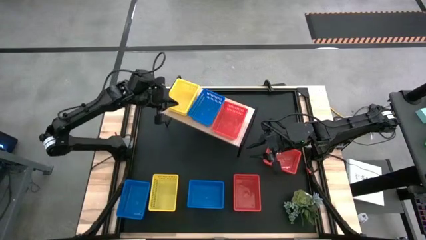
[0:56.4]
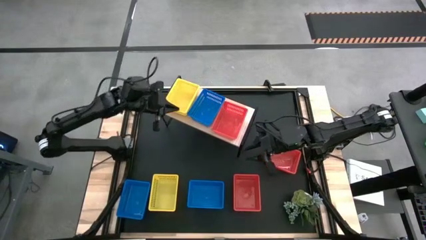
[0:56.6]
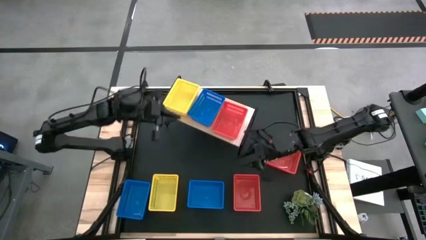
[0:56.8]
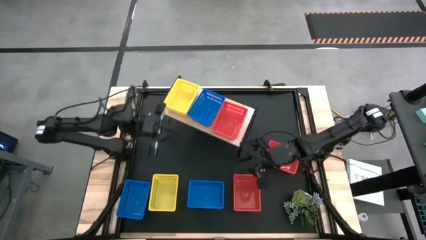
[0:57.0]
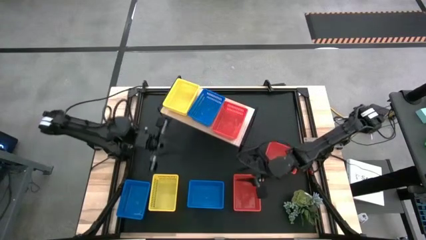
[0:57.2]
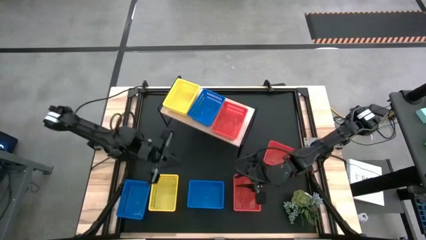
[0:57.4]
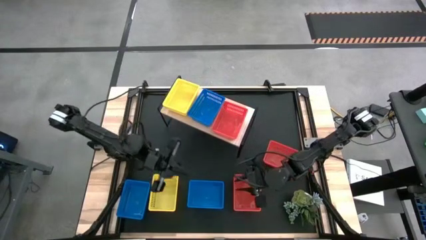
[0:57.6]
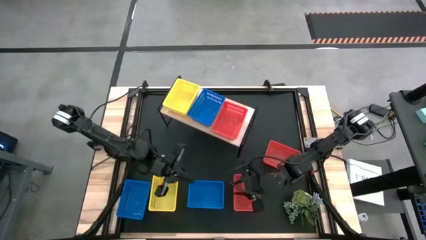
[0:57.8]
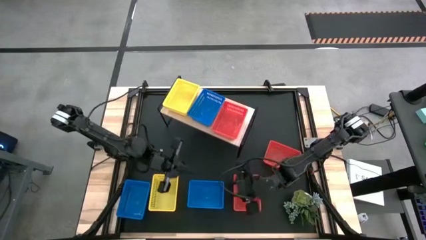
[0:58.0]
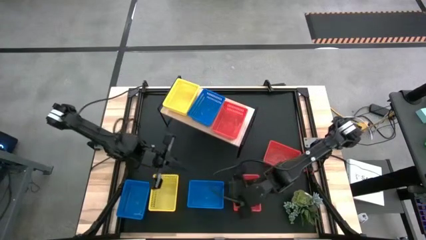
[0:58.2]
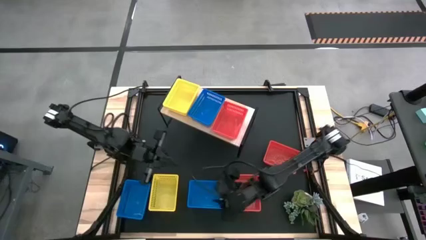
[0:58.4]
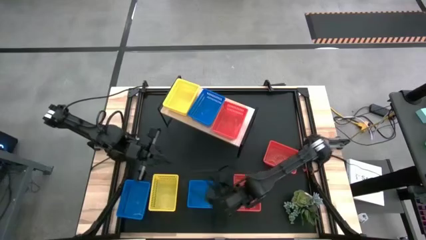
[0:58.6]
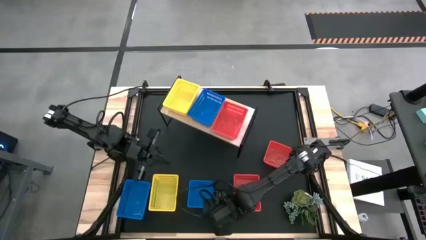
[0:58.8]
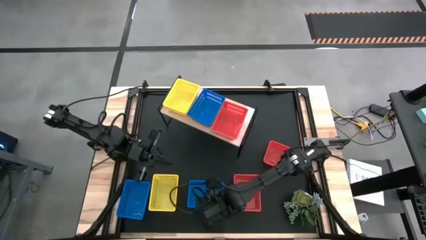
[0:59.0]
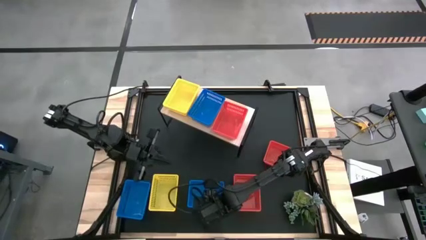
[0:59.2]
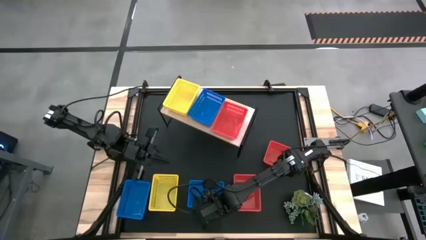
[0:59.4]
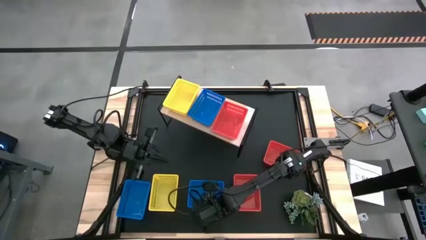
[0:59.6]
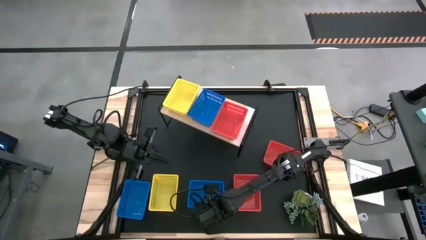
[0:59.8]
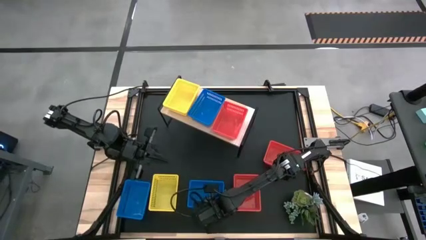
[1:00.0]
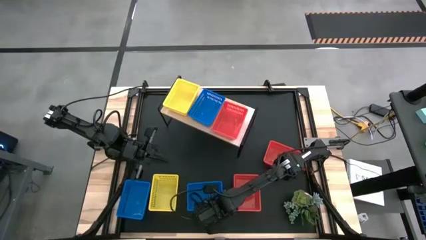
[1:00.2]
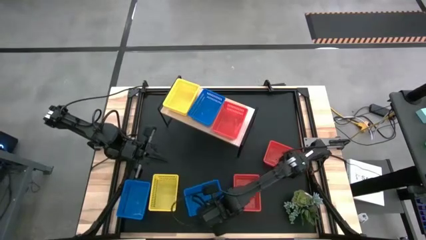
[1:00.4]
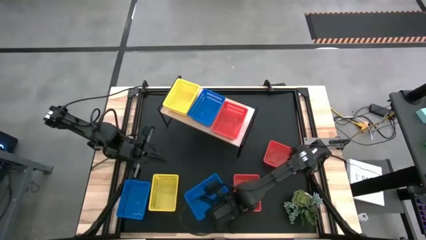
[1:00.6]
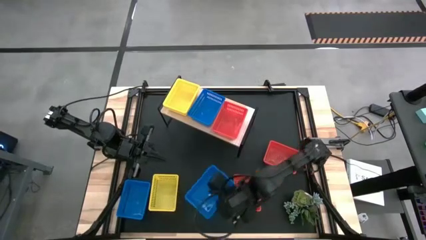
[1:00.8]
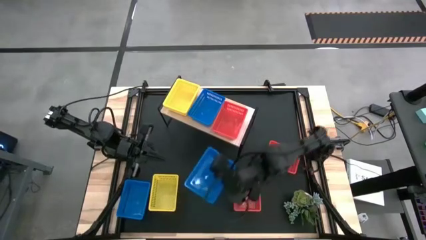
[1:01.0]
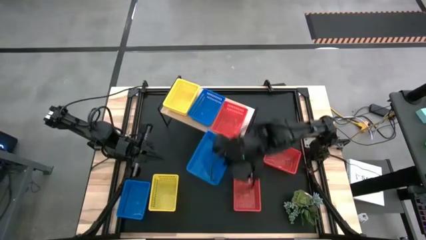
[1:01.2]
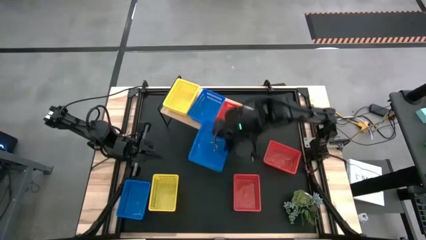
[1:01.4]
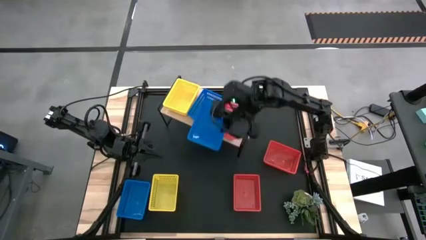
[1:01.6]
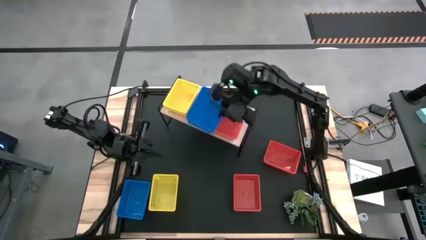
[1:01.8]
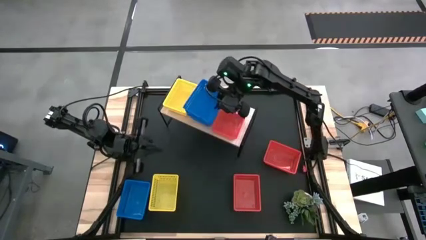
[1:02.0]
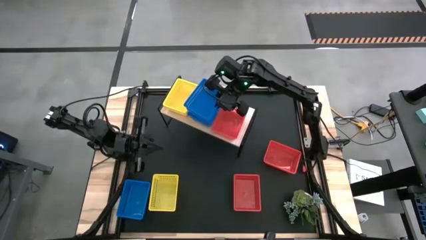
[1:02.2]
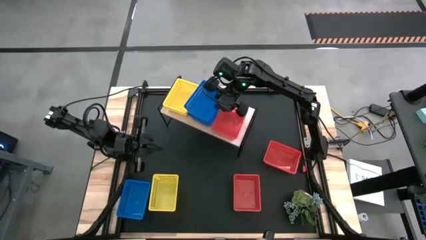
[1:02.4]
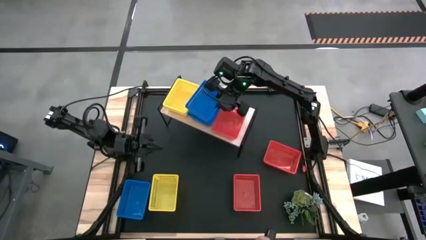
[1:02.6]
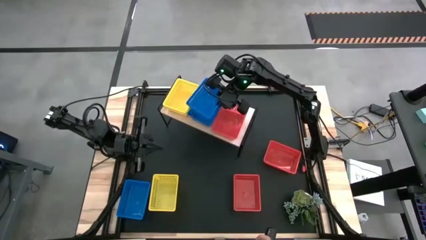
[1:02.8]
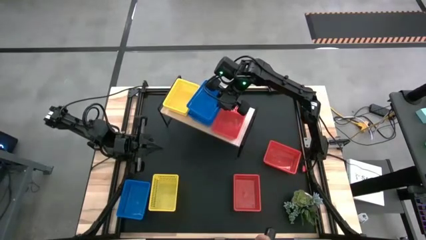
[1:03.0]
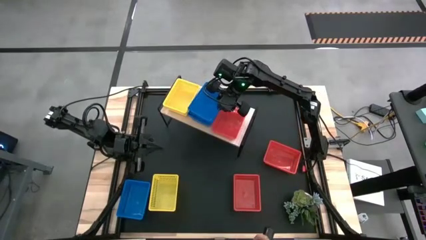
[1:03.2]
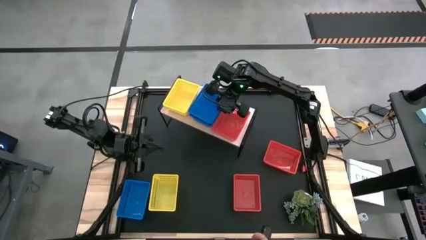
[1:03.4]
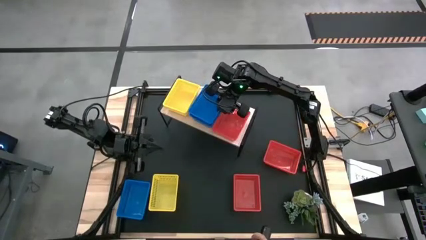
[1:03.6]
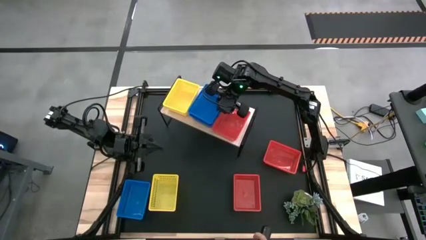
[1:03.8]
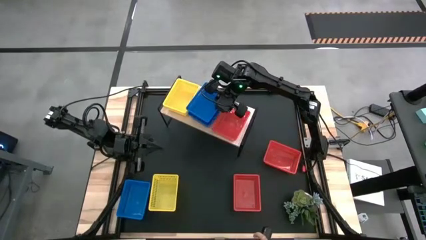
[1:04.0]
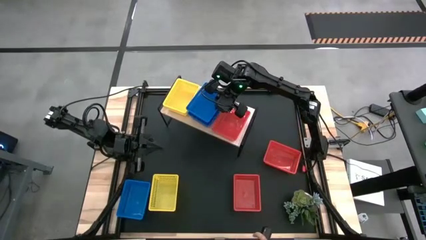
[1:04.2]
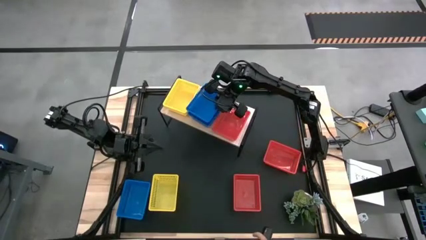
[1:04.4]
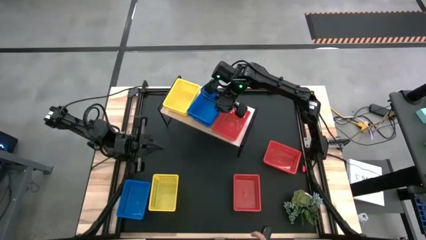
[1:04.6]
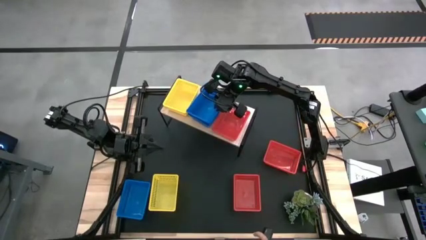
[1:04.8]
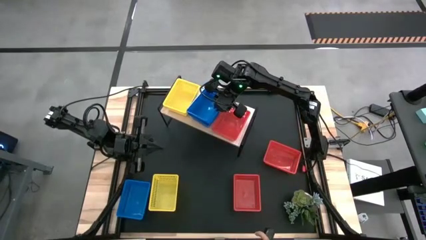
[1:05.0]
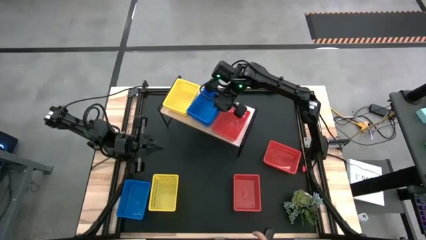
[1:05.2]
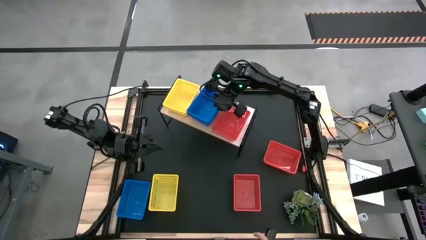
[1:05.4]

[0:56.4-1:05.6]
Task: Stack baskets on shelf by color
Stack the middle right blue bin on top of the blue bin on the shelf

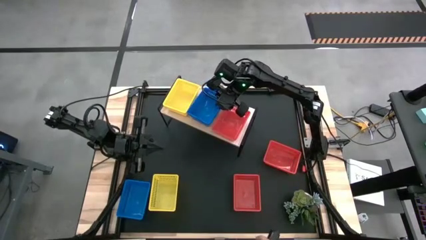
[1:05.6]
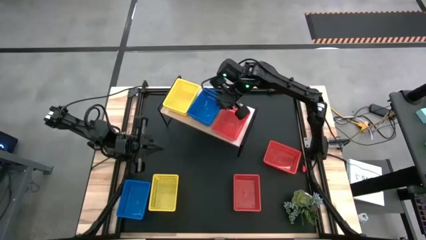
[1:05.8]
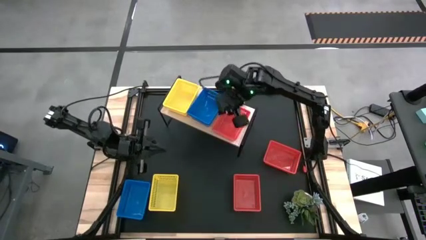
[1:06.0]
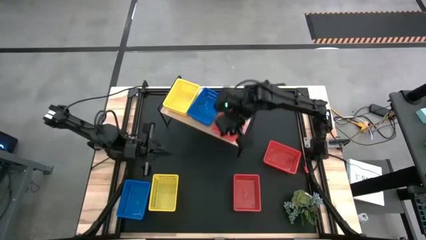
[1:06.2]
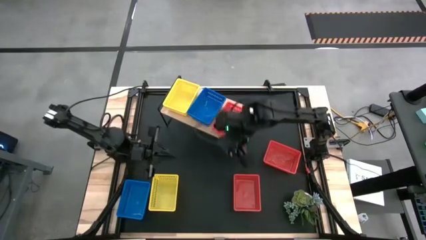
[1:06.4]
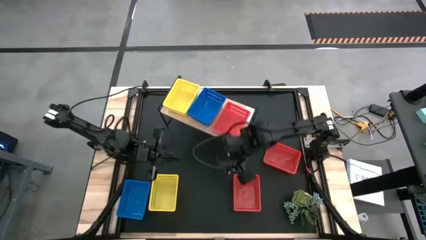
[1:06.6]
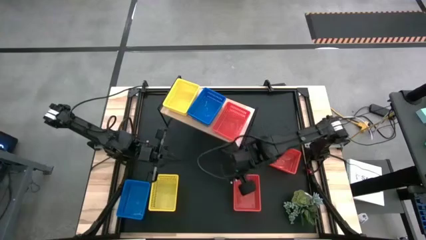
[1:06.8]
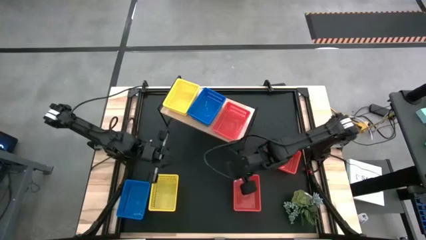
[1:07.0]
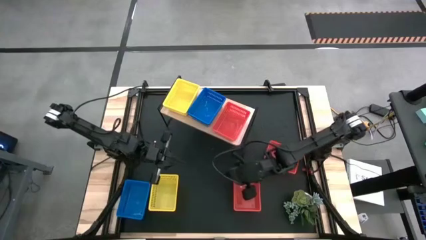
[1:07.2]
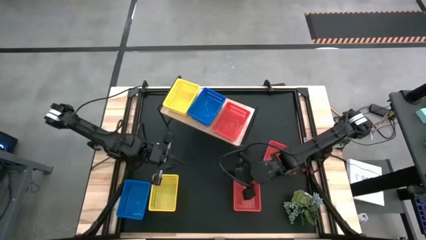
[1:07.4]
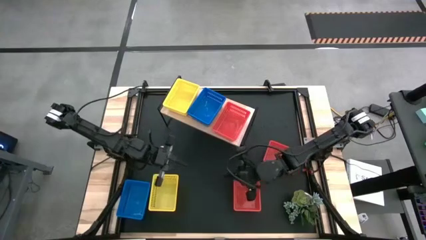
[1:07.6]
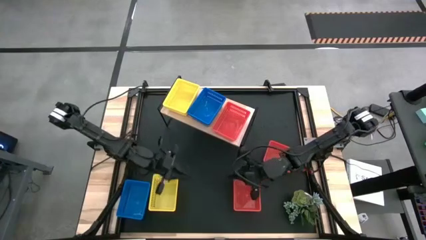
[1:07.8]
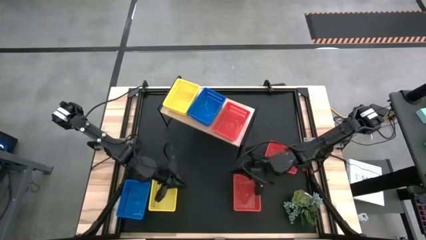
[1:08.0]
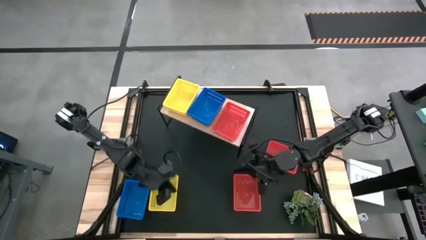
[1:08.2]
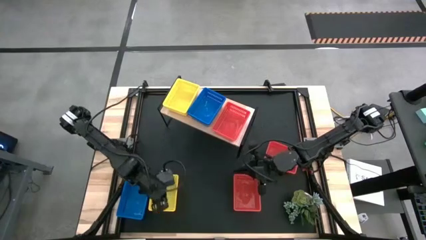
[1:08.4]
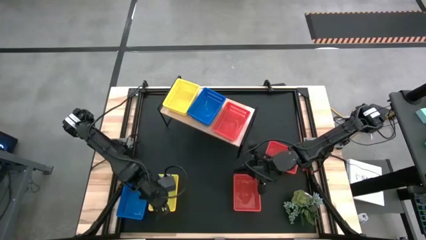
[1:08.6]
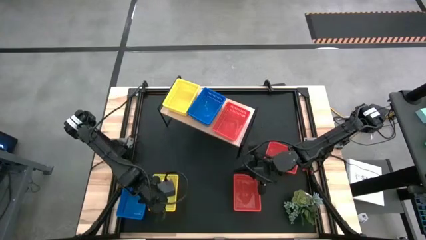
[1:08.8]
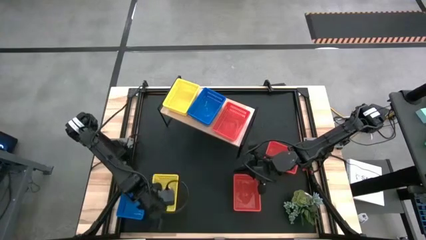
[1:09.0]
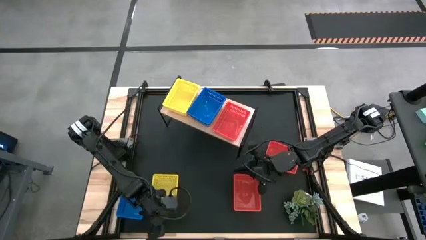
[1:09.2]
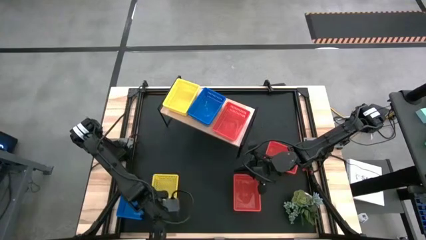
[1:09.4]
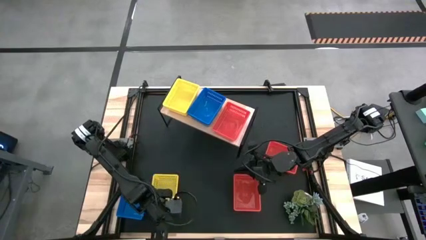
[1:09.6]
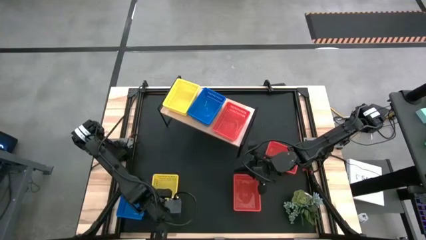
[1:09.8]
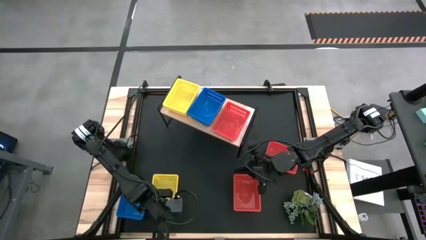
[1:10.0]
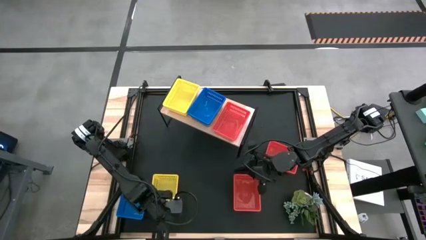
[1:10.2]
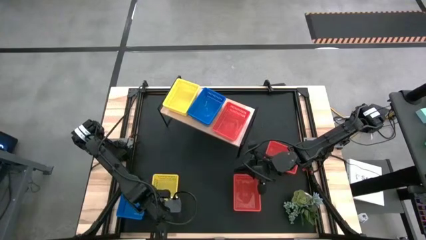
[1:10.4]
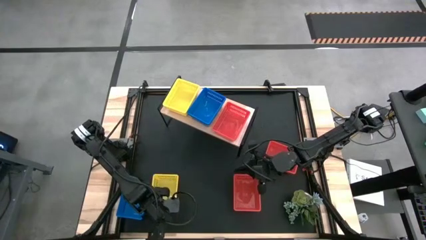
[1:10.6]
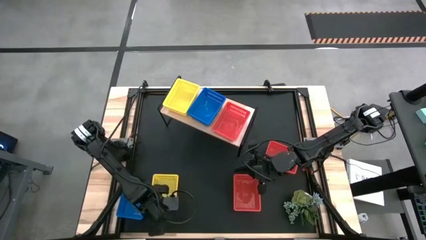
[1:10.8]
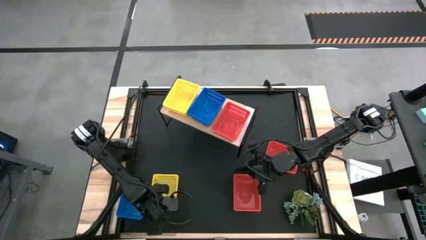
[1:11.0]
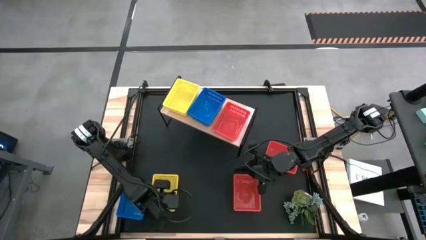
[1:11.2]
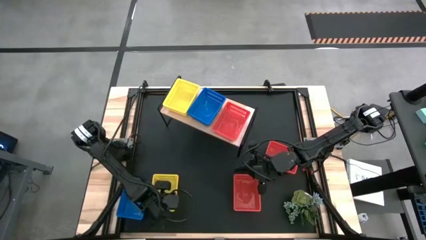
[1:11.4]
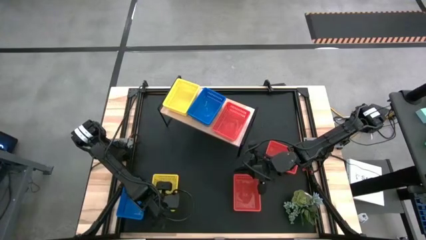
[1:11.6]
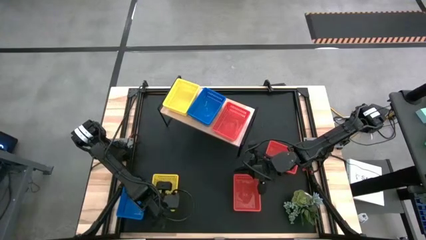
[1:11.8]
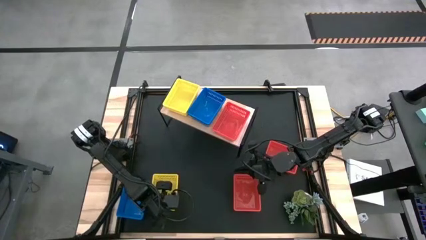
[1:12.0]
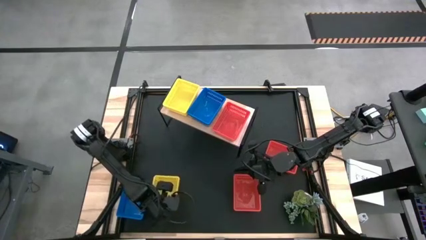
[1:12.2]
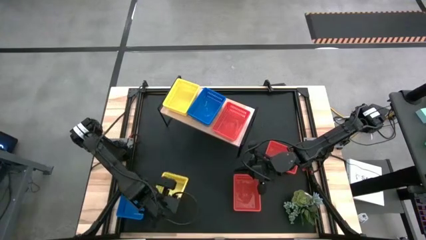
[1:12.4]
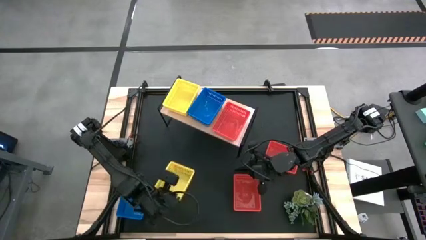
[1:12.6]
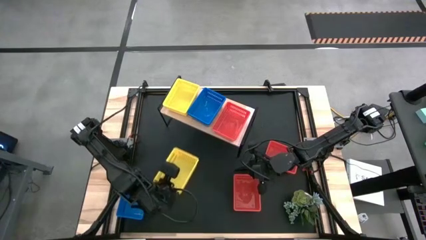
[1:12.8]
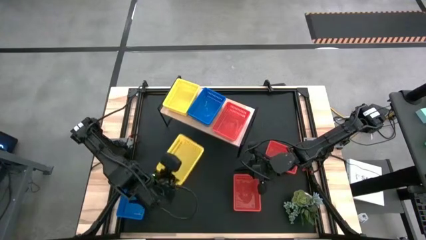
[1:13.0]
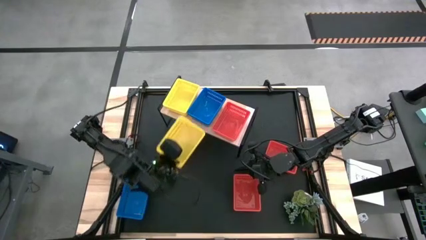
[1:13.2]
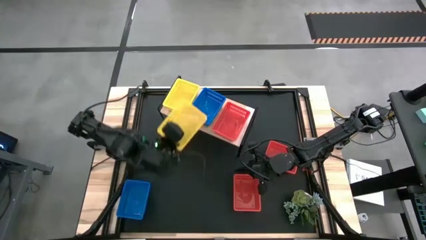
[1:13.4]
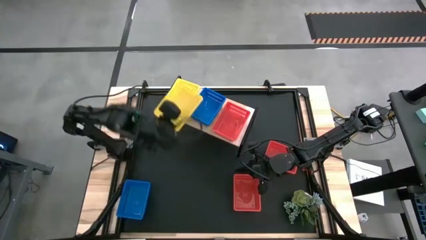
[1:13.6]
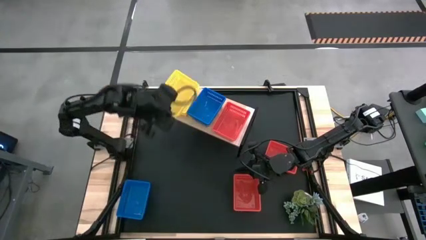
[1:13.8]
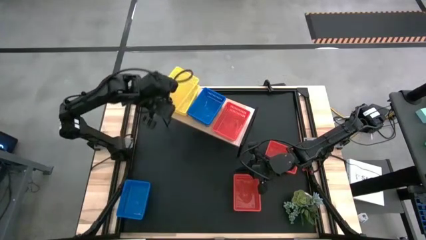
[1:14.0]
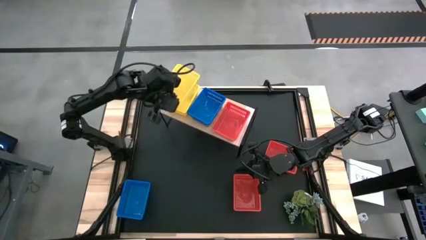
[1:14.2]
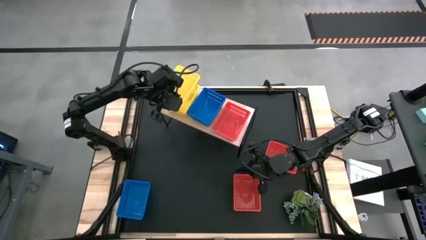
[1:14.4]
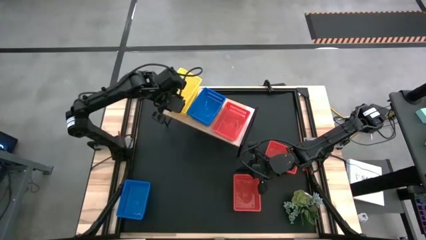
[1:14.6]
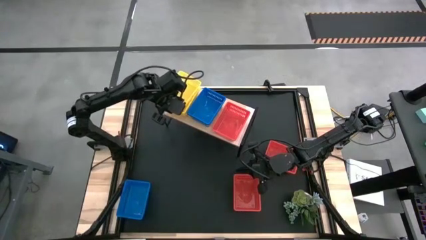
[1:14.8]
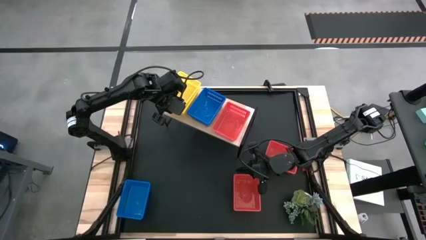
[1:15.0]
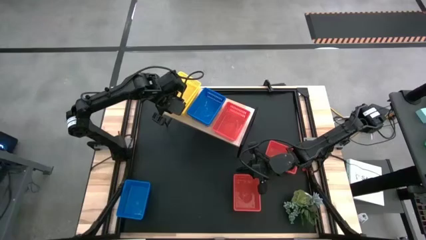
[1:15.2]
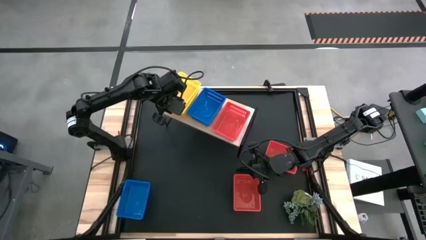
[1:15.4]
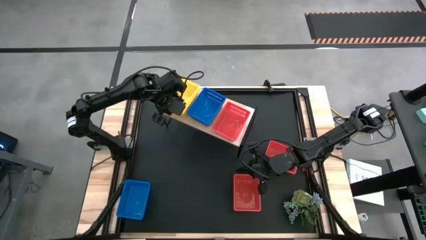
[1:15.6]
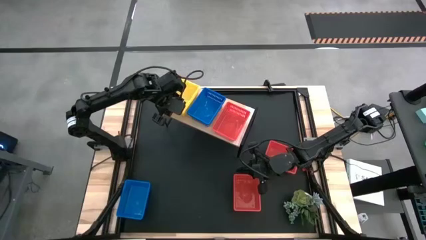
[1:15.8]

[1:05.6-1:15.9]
Stack the yellow bin on top of the yellow bin on the shelf
